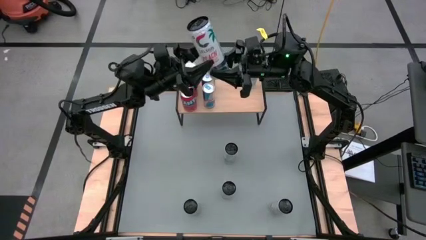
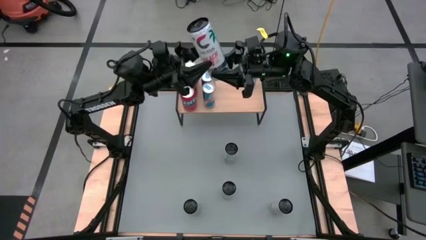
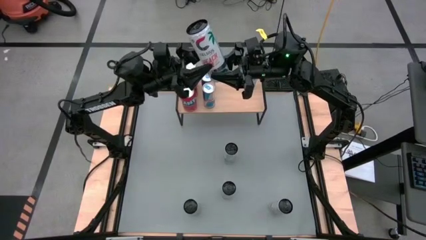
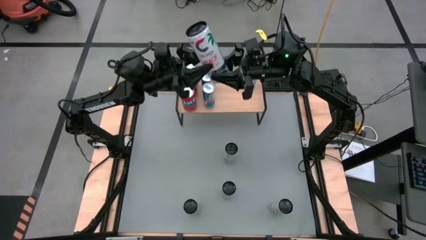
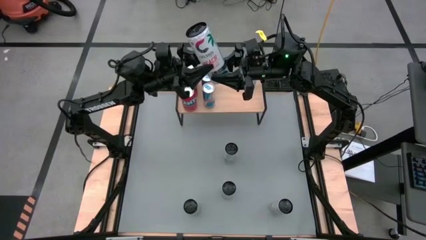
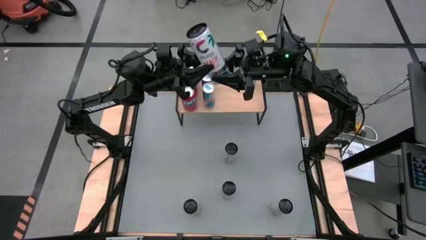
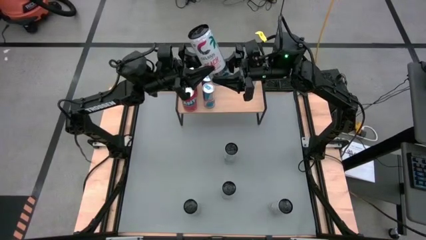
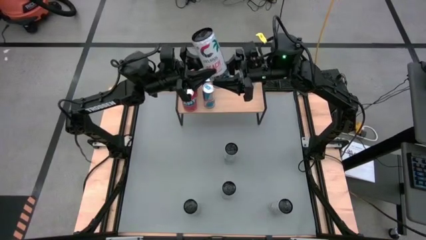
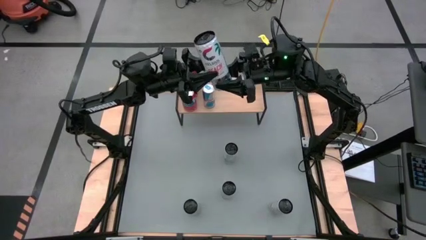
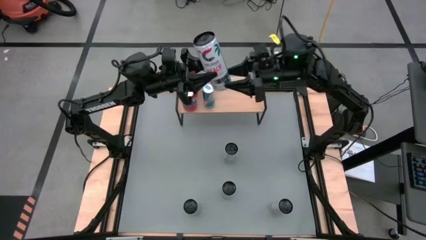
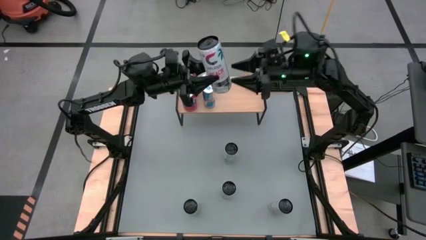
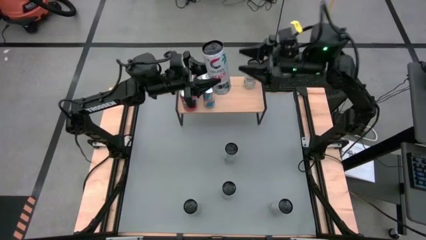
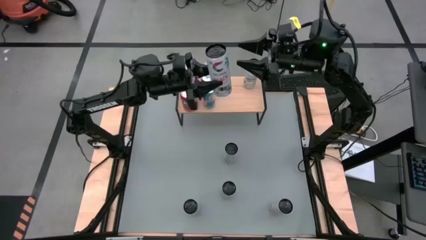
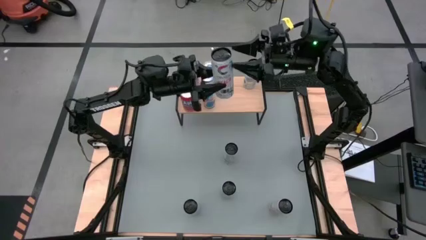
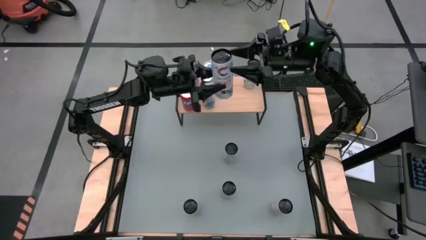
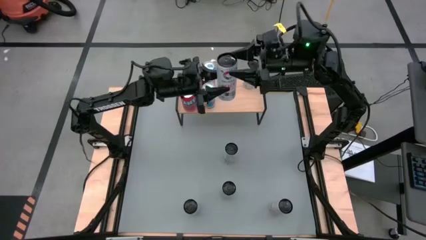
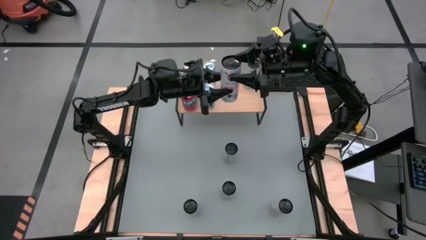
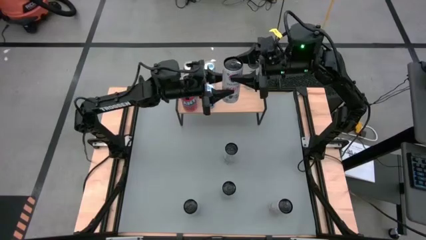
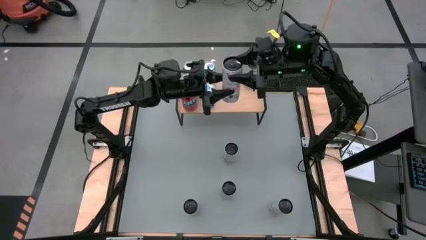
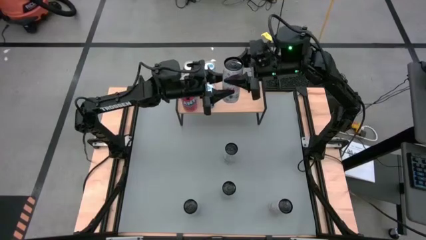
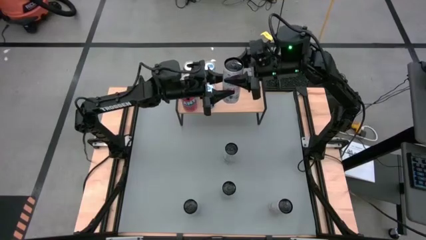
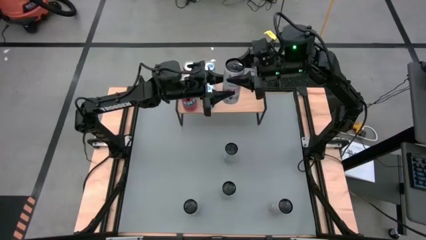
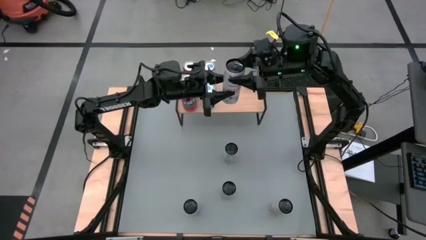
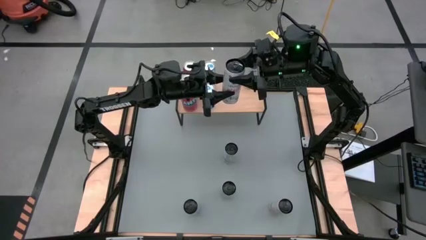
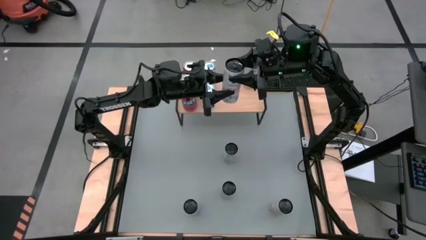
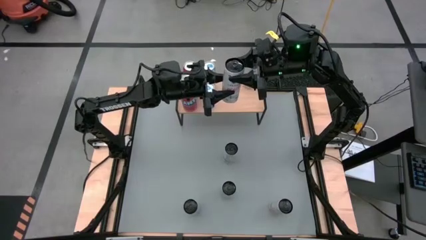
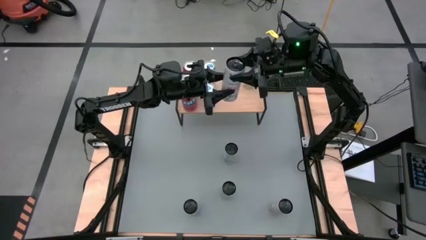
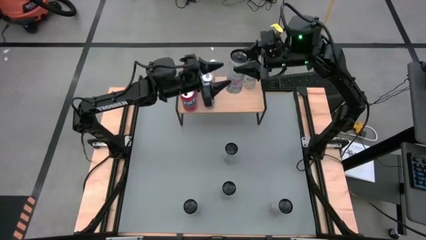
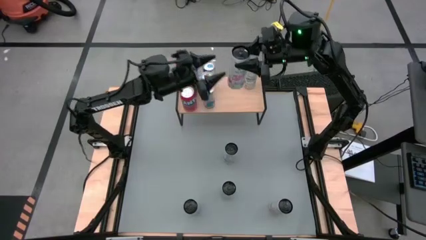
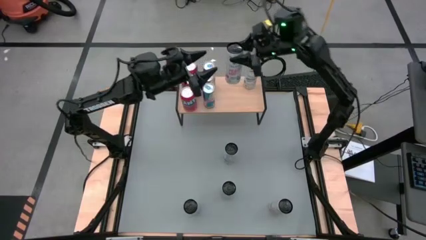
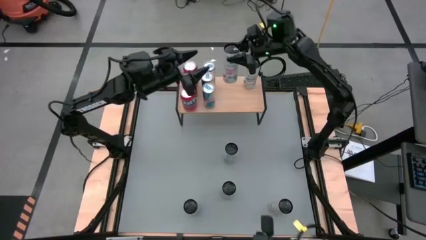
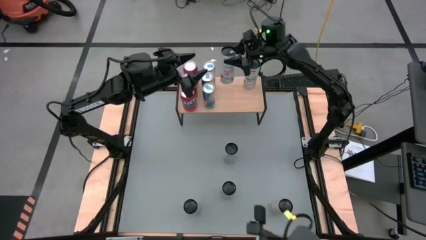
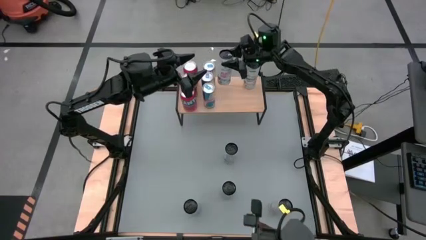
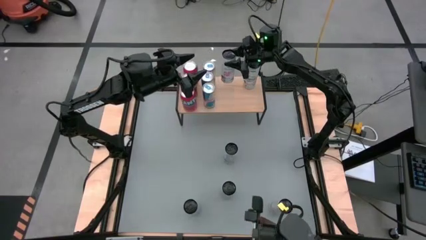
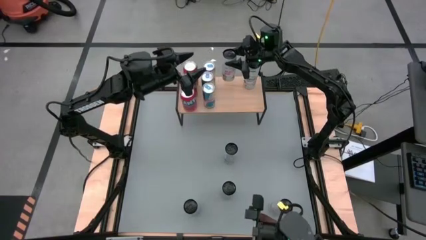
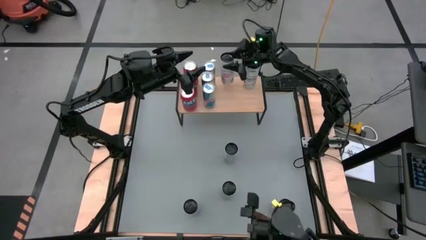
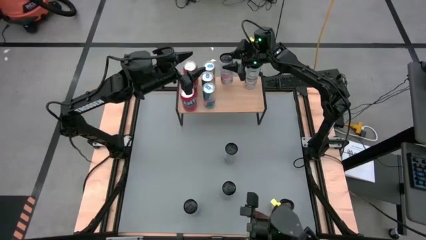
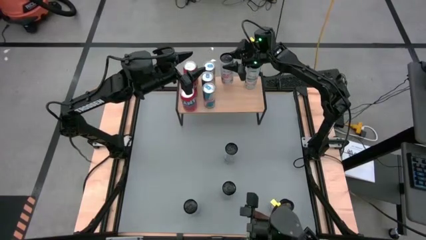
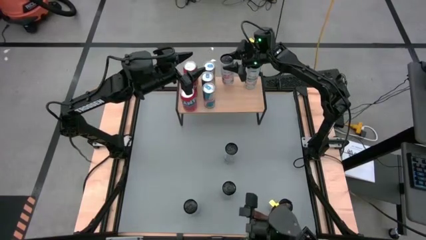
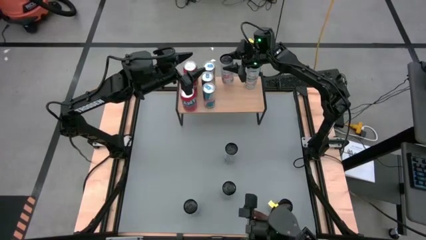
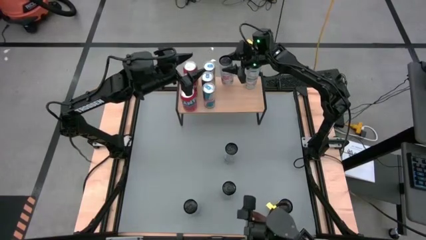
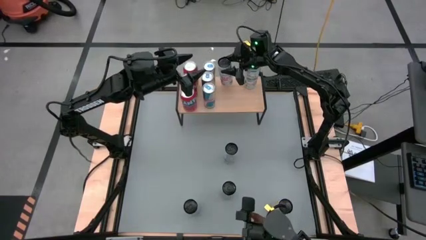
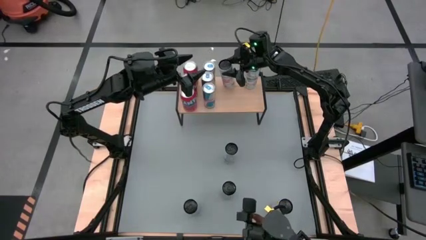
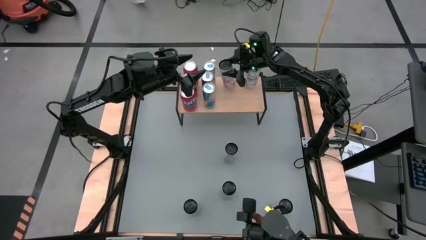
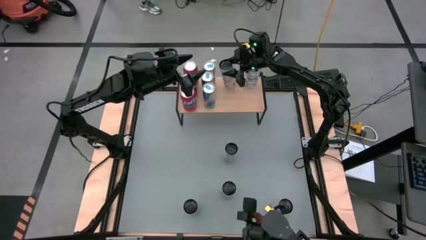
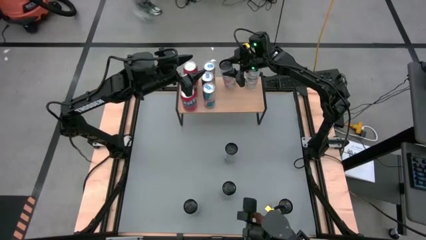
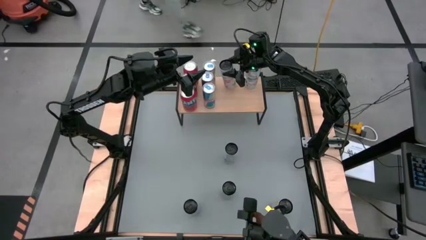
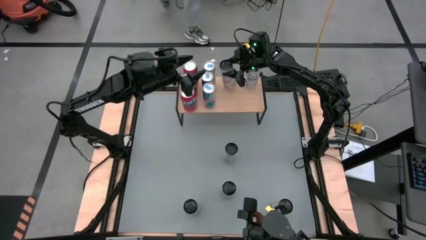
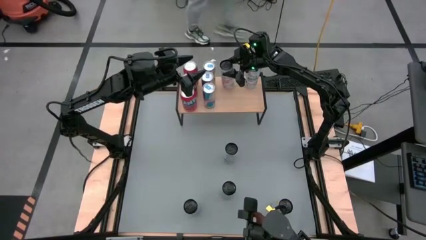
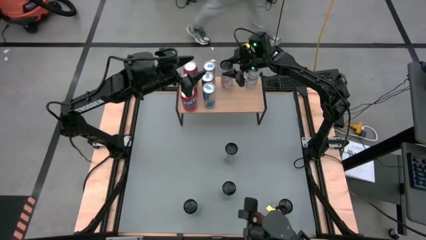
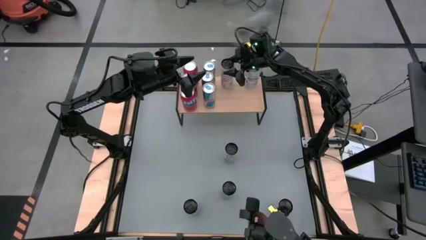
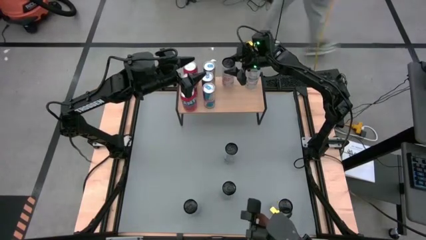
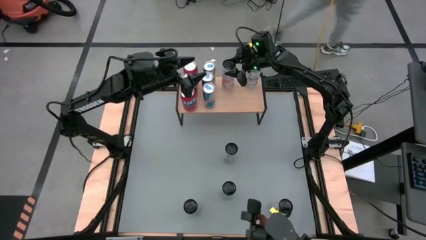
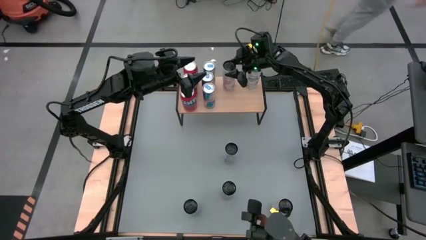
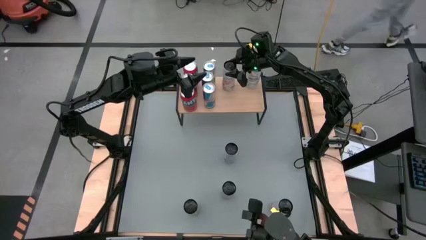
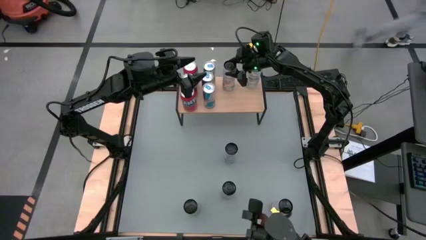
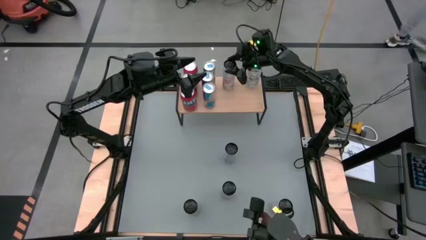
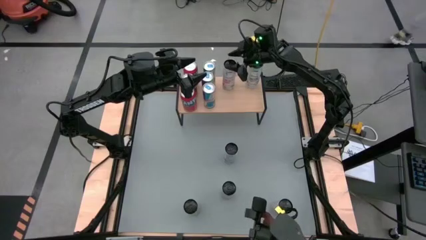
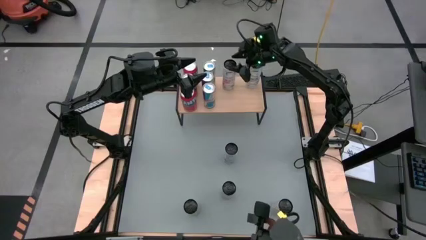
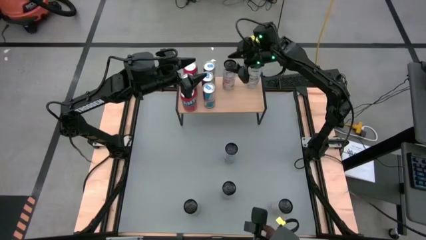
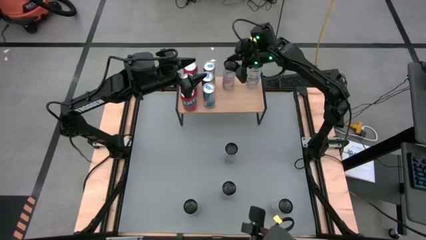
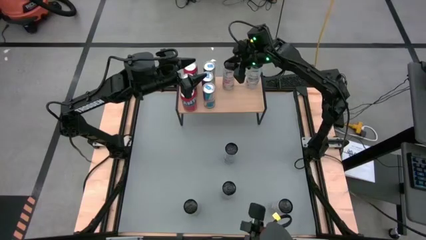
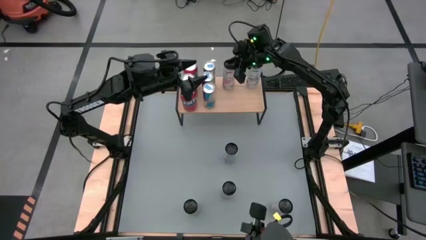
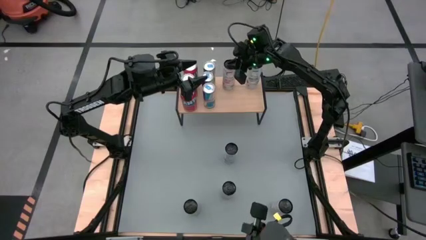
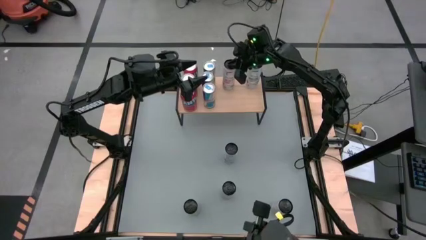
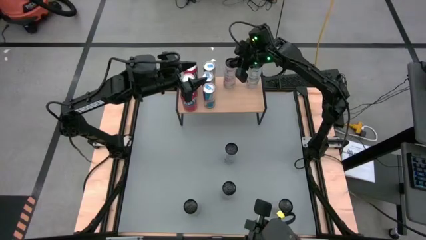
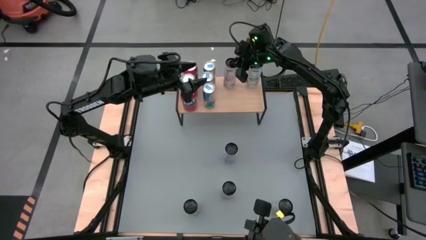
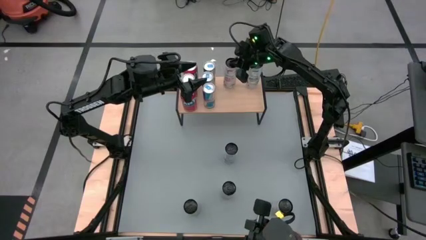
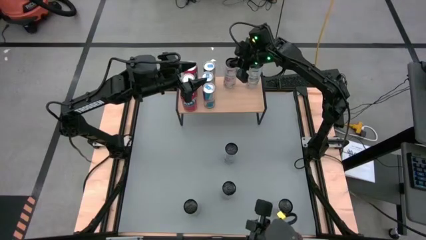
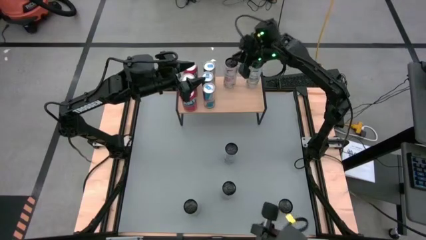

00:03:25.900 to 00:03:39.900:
Task: Place canned beverage on shelf
Put the top left white-pink soda can on the shelf

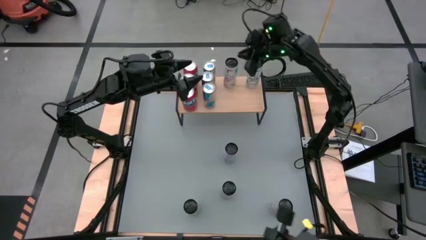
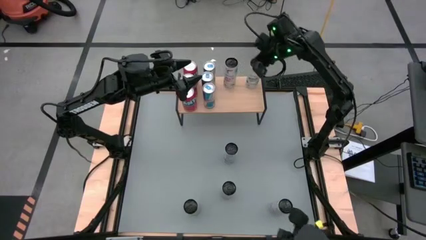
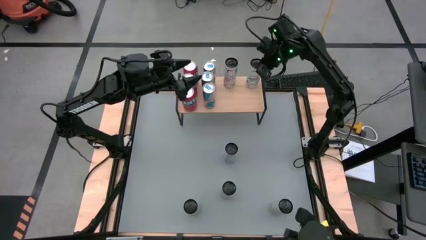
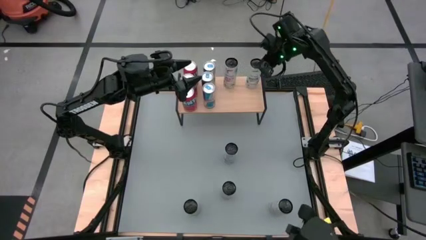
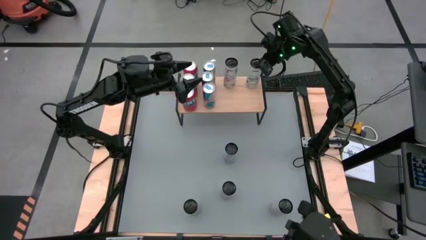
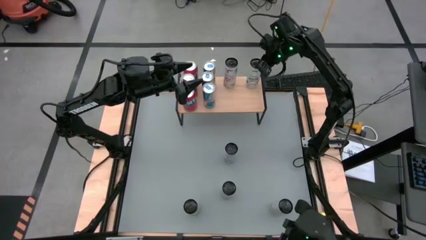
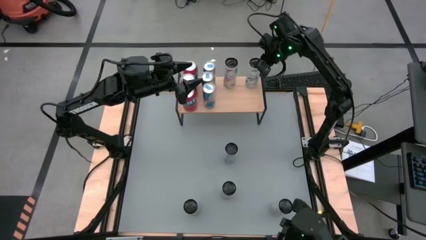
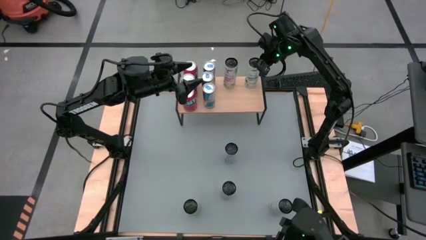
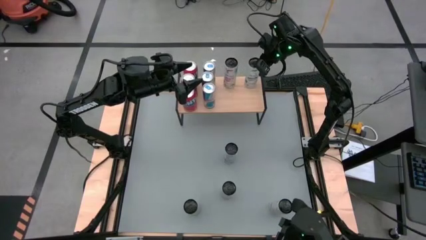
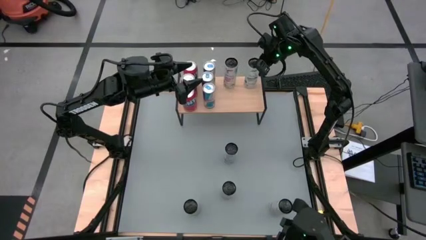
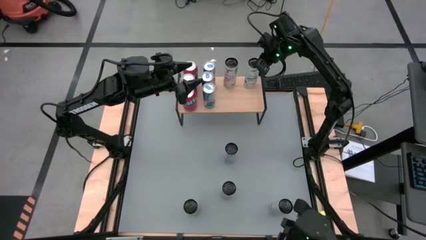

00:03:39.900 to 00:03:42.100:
Adjust the white-blue soda can on the shelf

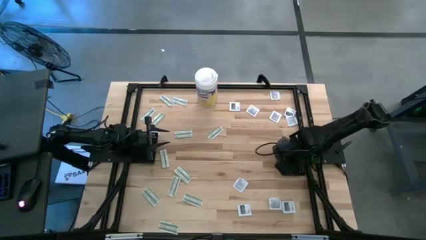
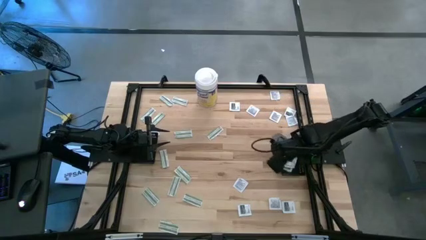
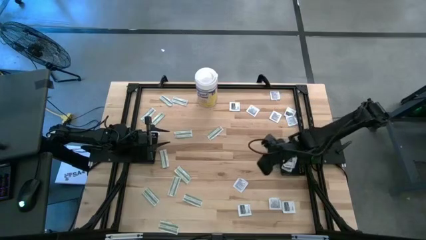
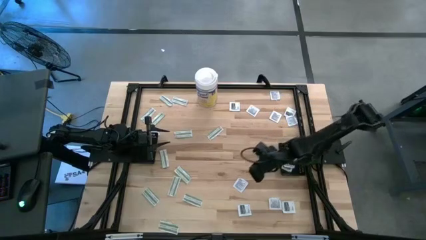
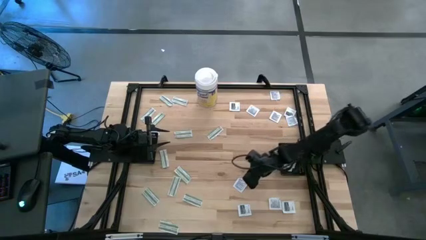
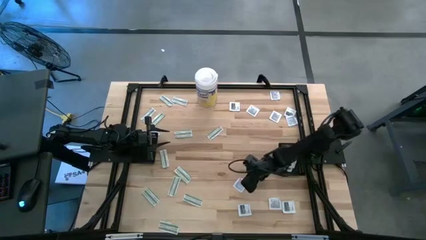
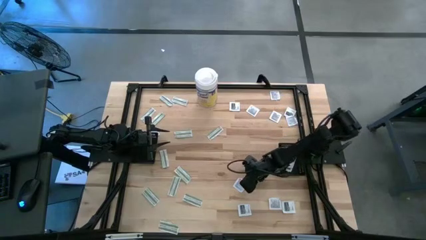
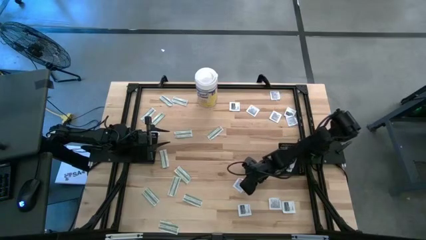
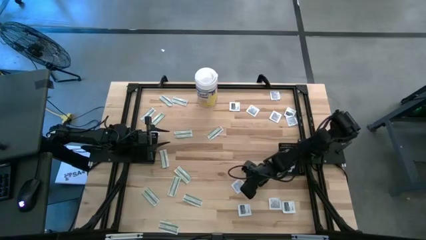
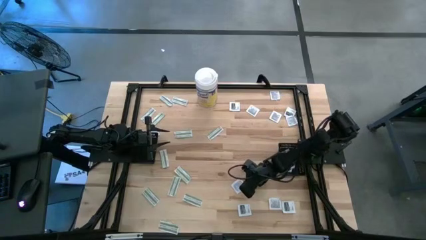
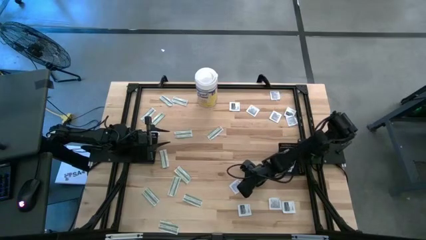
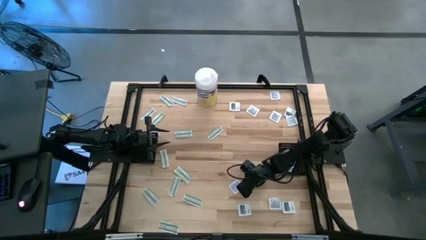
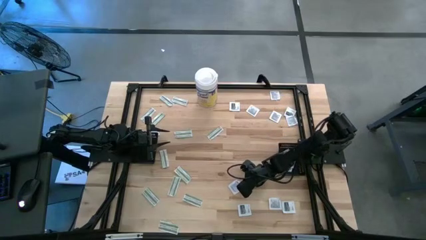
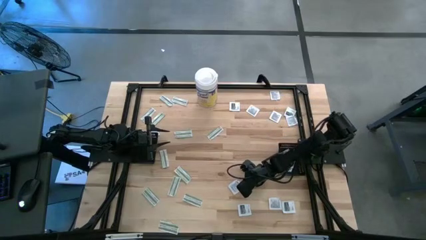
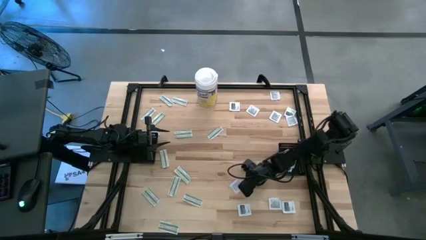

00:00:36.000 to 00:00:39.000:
Task: Pick & Place First Aid Supplies
Put the towelette pack into the right black basket
